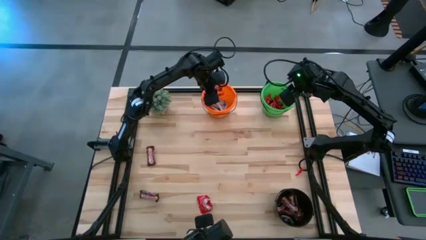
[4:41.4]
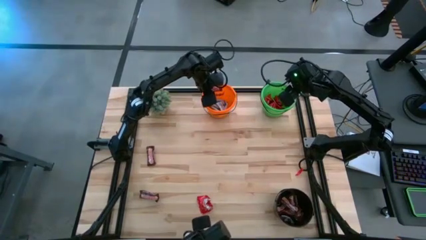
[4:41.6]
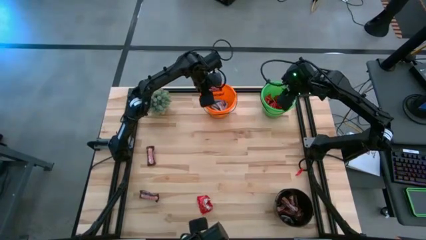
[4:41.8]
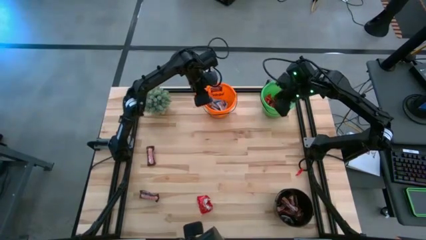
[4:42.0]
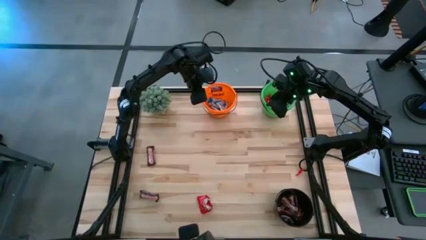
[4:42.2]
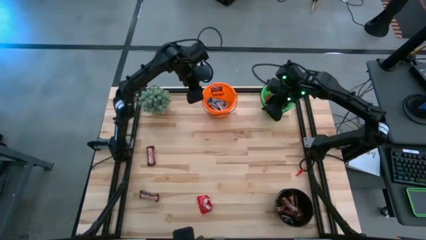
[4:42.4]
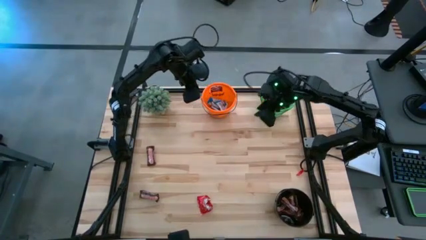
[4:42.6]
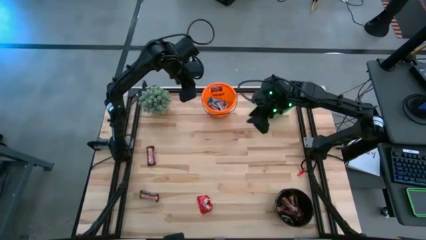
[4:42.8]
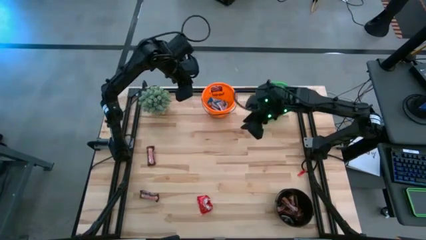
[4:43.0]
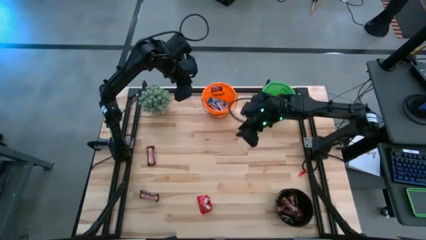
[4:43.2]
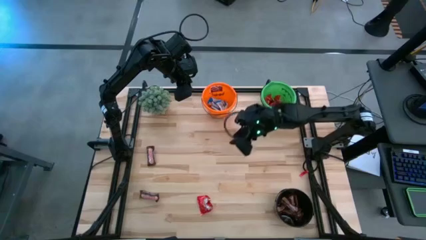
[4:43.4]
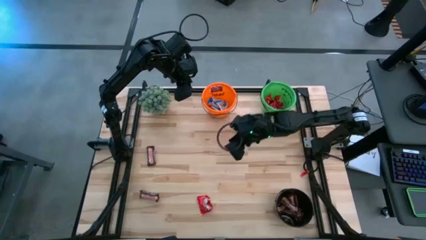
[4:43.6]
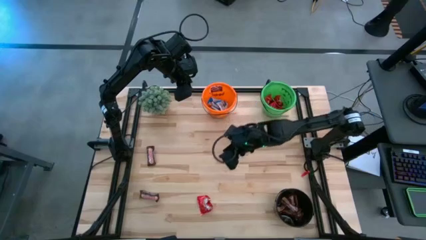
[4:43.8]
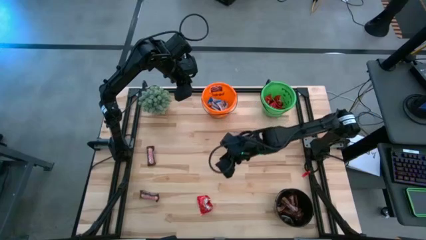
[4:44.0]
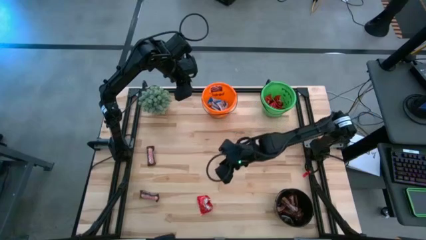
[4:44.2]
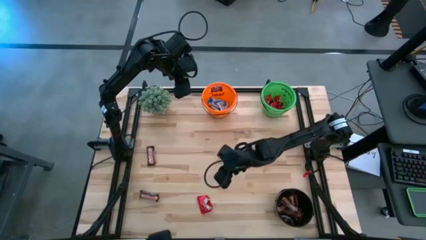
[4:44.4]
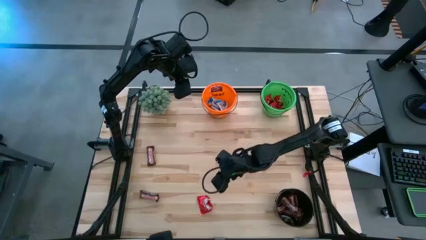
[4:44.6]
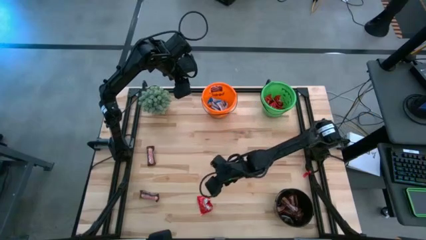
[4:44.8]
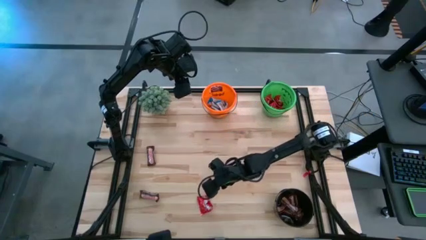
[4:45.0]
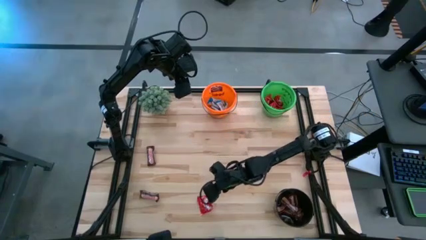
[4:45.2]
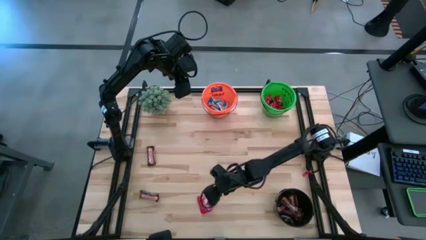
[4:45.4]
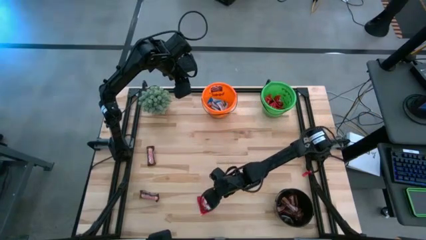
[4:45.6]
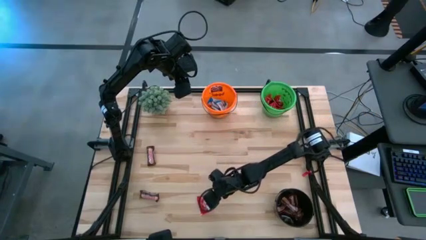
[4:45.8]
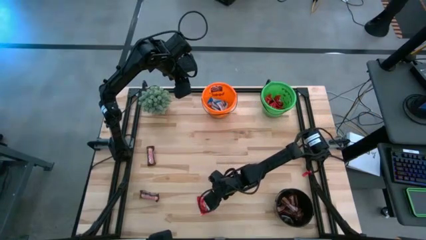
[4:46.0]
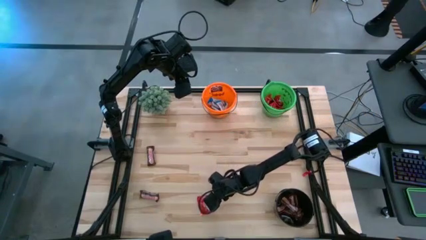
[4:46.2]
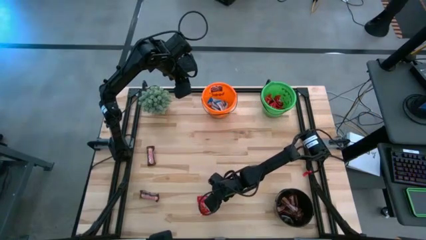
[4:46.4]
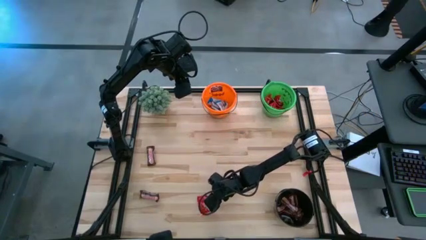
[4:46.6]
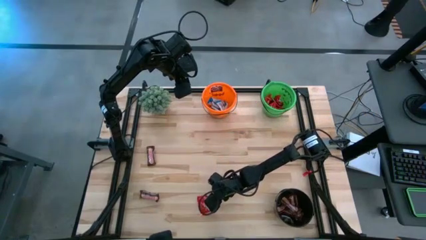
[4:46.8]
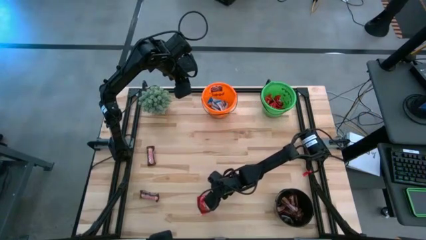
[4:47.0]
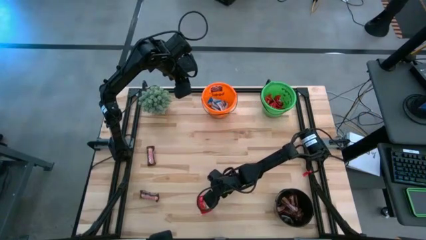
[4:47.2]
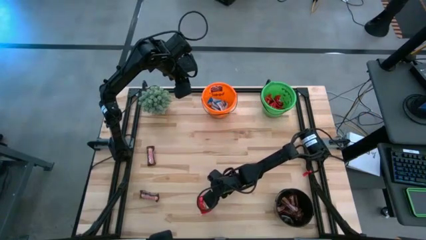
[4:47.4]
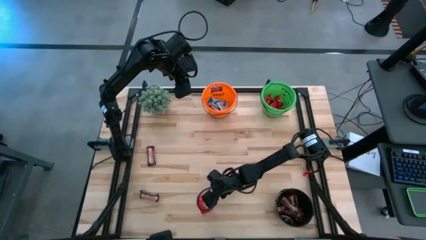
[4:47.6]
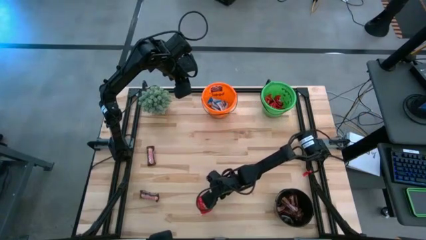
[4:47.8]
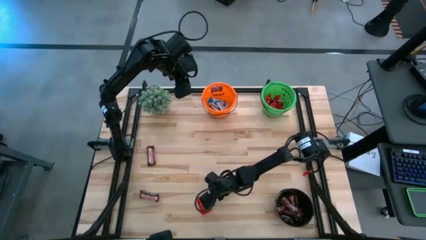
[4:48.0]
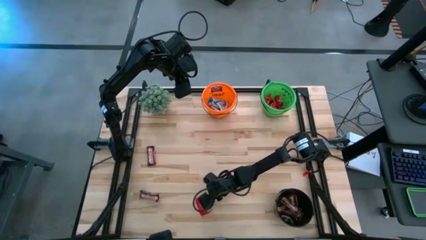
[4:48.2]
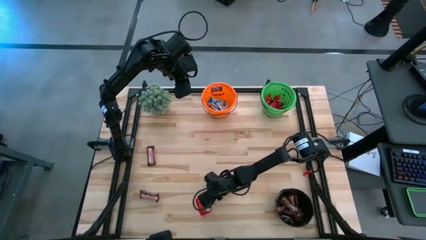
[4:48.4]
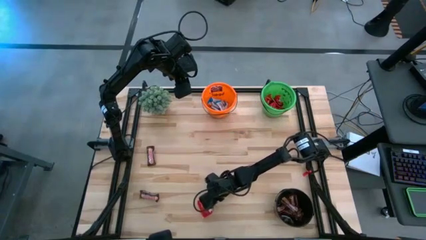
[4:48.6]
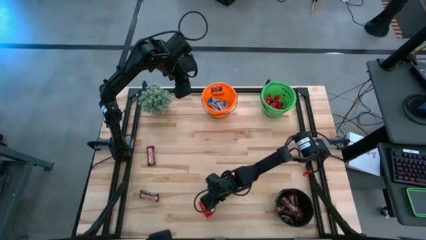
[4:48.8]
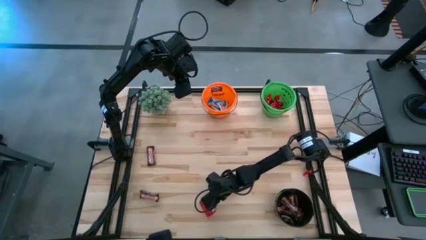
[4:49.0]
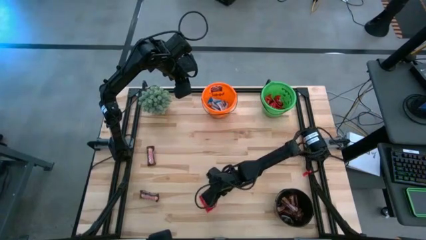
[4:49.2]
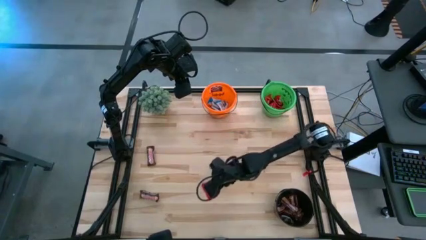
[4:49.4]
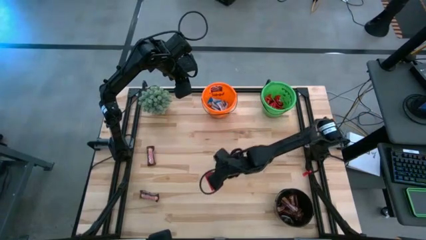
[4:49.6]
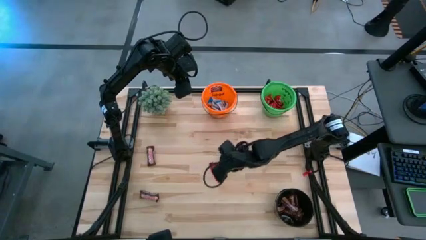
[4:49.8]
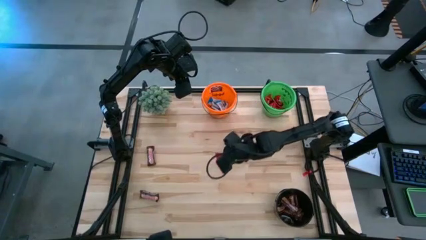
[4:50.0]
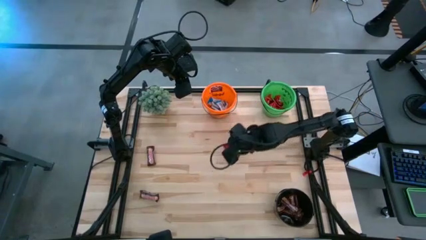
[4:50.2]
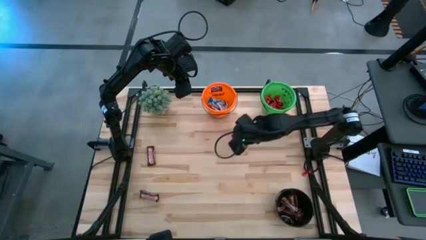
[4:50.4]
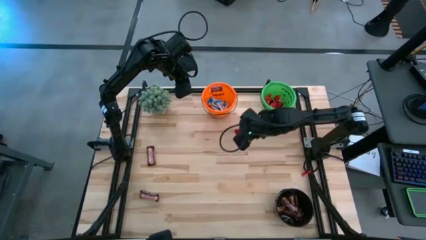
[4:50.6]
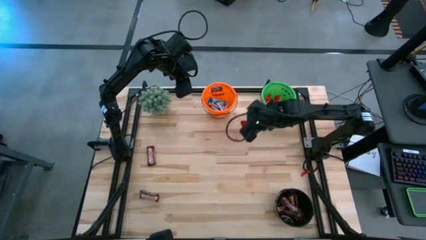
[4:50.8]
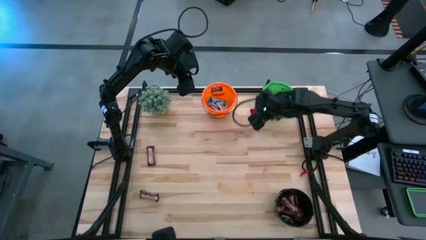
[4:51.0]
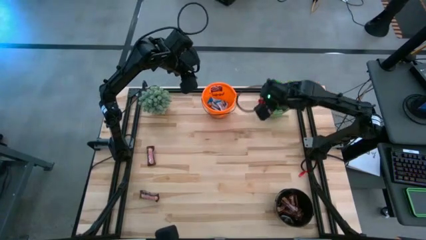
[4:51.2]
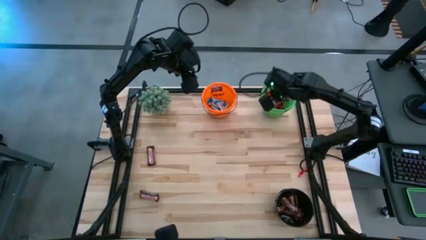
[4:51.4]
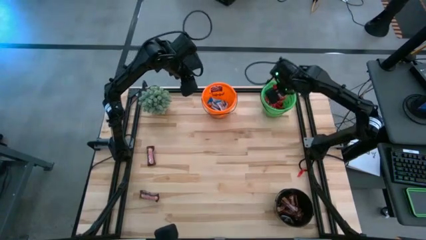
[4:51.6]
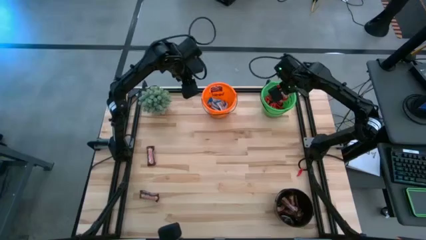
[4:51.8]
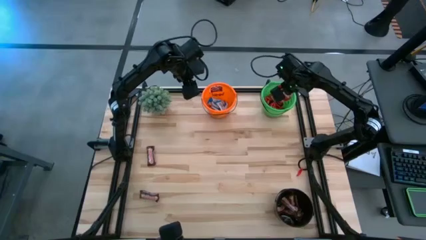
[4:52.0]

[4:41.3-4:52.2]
Task: Organize candy in baskets
Put the red candy into the green bucket

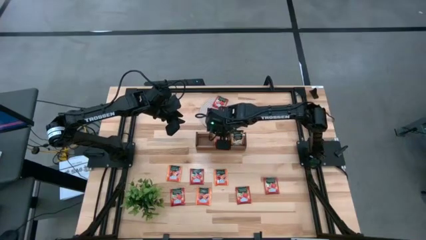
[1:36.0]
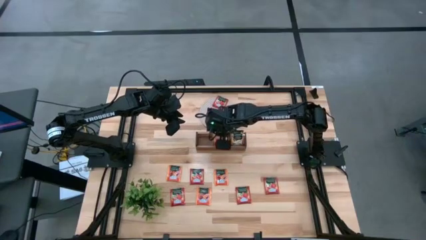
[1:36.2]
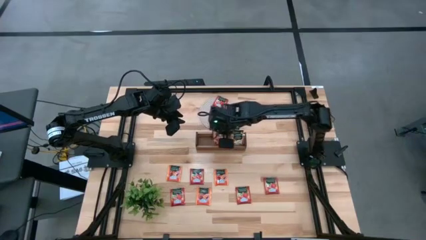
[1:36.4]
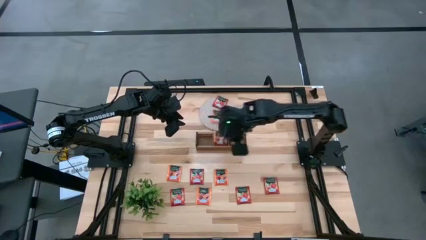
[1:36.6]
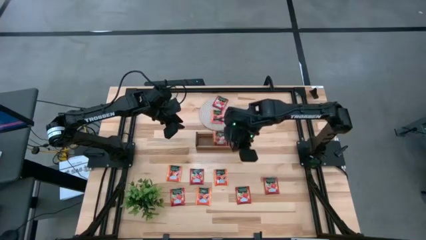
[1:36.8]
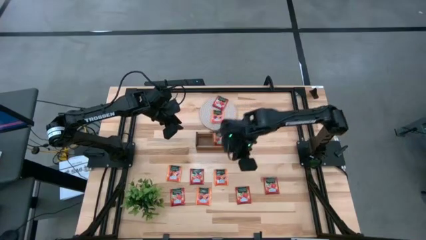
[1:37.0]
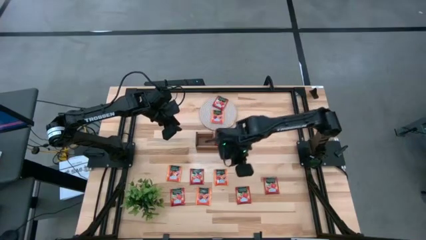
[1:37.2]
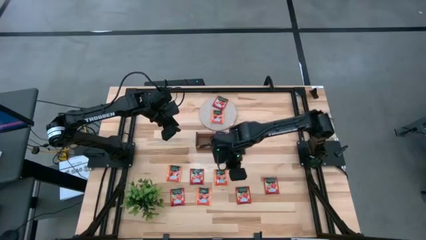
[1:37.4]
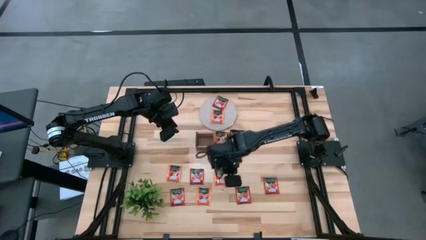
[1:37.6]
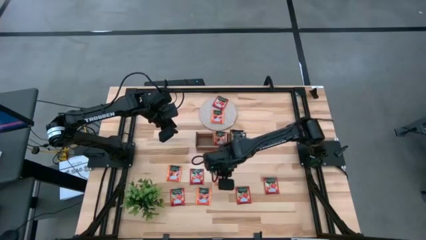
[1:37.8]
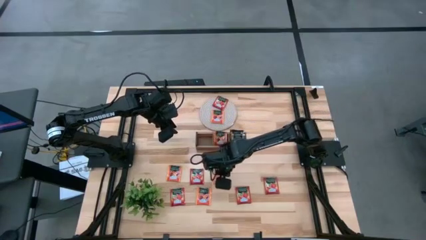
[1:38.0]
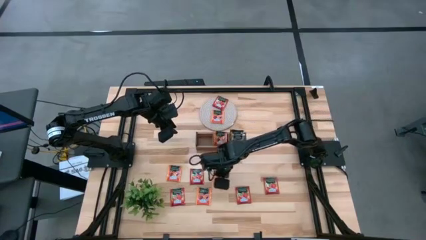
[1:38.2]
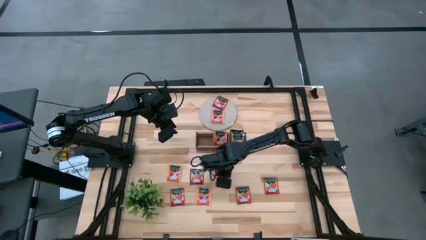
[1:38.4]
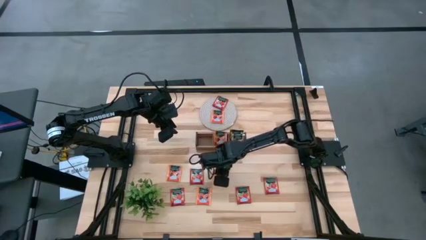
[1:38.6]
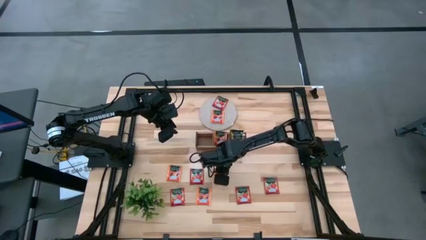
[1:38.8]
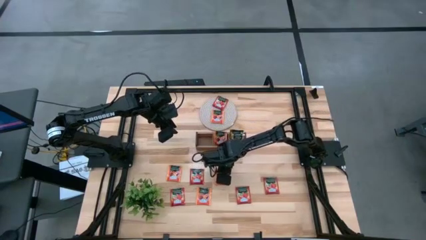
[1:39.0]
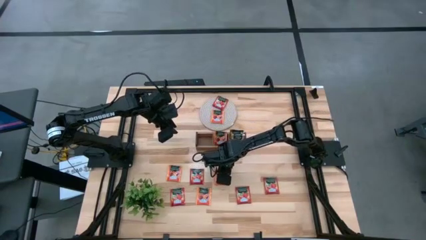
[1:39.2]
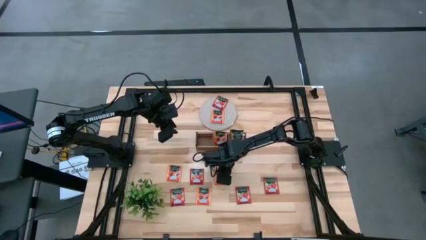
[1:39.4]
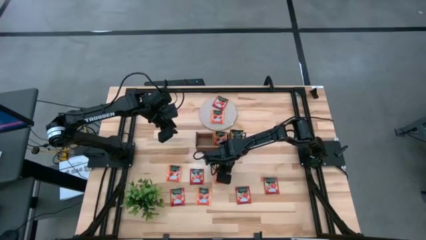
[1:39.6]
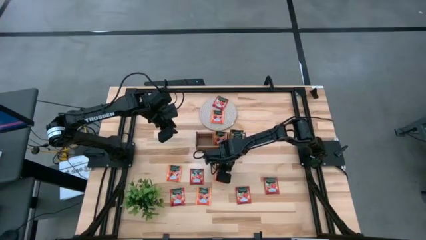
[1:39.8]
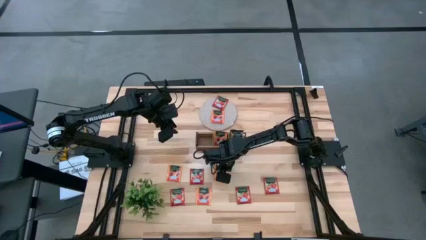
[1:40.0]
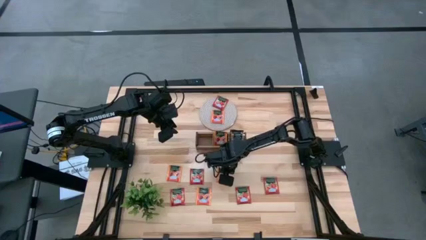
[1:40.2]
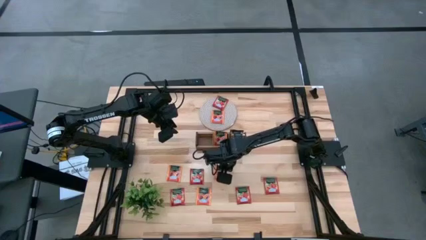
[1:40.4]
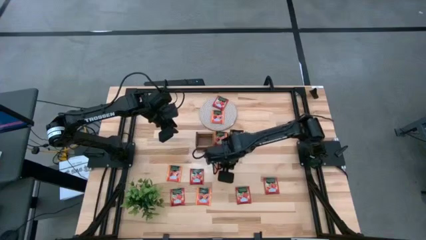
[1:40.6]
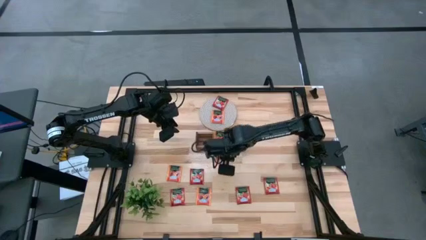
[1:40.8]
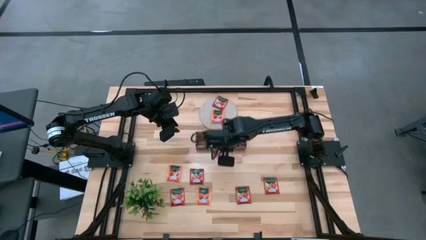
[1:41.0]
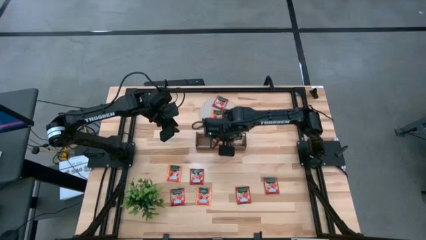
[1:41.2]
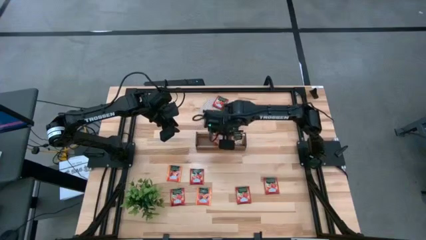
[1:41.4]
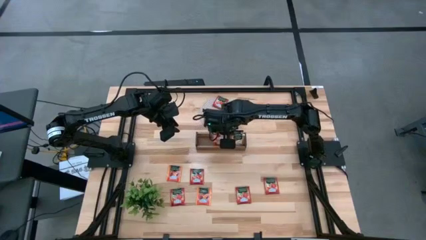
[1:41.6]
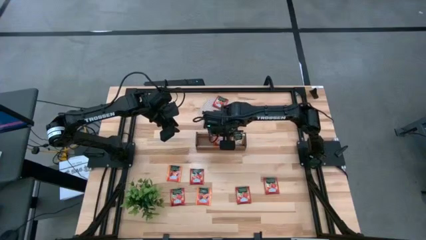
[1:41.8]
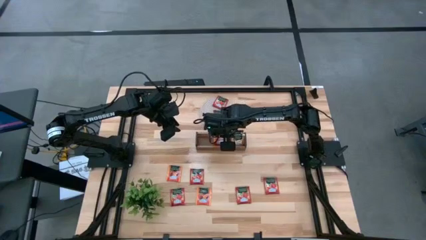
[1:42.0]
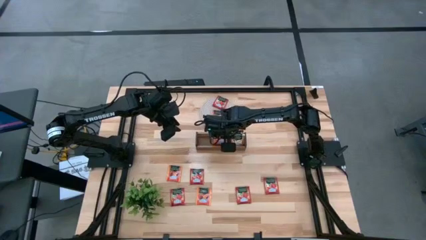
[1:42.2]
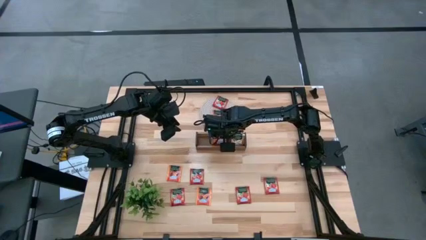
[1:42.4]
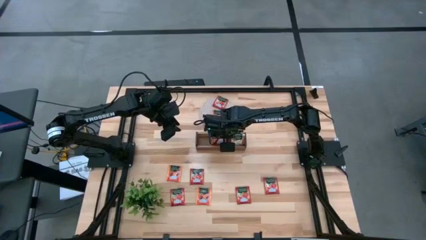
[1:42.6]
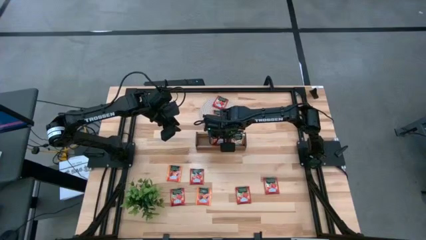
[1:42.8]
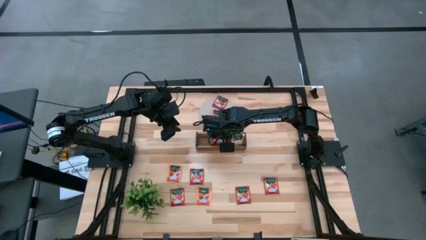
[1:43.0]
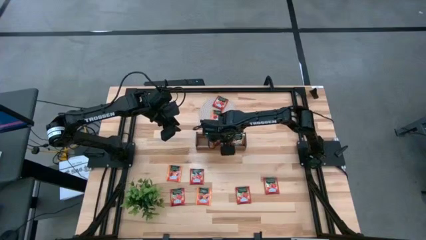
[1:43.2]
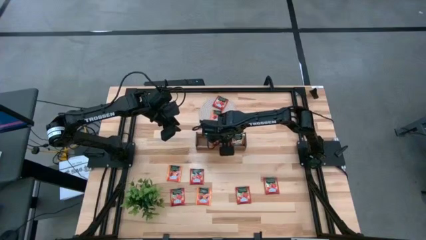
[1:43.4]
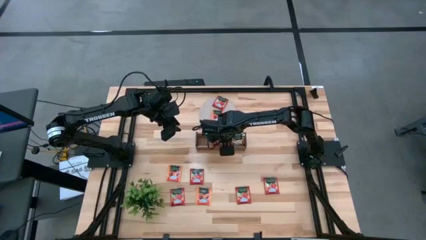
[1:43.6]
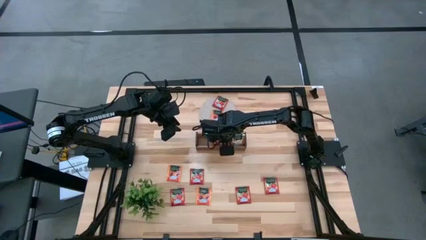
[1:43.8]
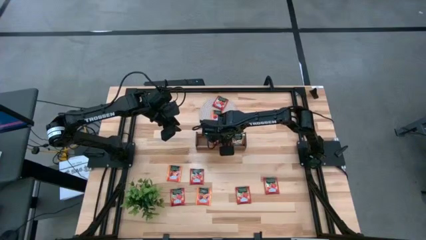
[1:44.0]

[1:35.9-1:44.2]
Task: Pick & Place Tea
Put the orange tea bag into the middle section of the wooden organizer
